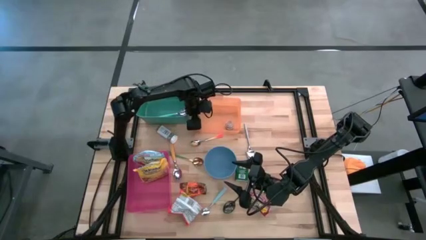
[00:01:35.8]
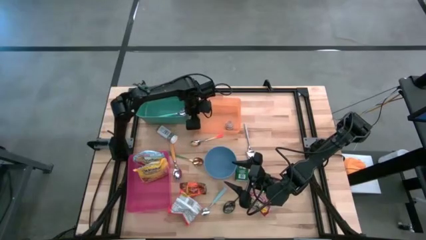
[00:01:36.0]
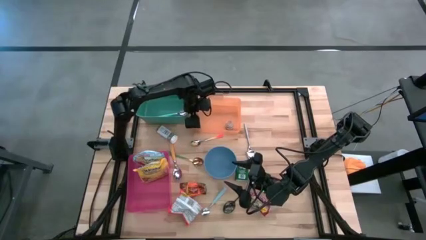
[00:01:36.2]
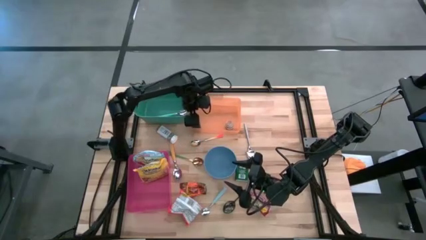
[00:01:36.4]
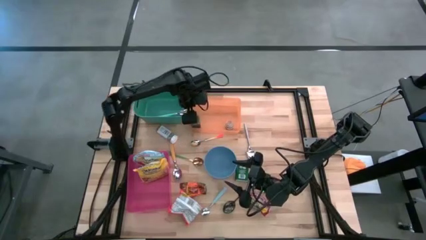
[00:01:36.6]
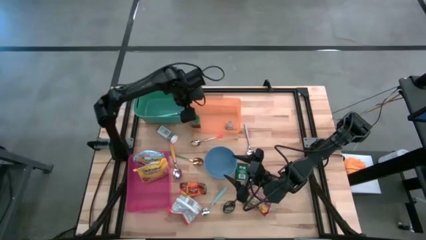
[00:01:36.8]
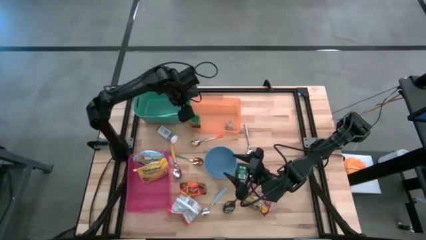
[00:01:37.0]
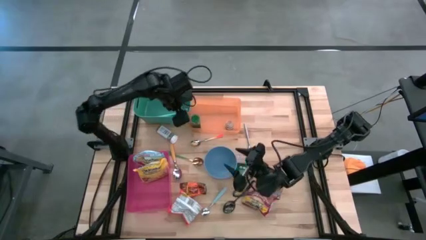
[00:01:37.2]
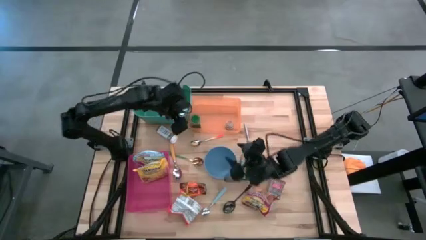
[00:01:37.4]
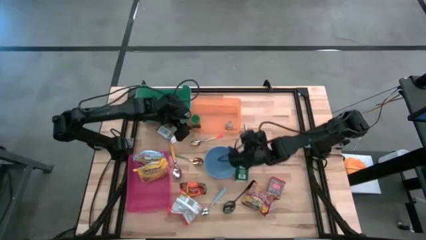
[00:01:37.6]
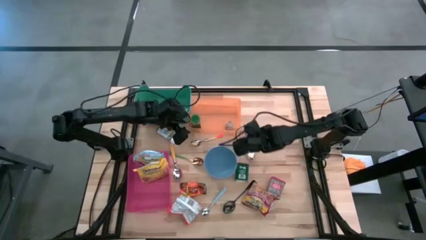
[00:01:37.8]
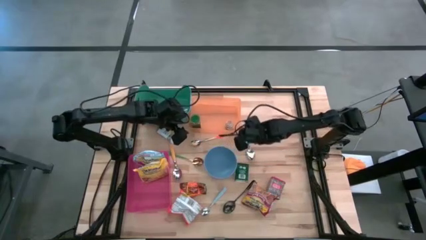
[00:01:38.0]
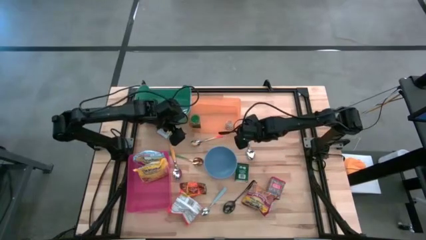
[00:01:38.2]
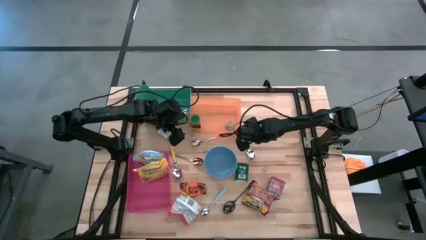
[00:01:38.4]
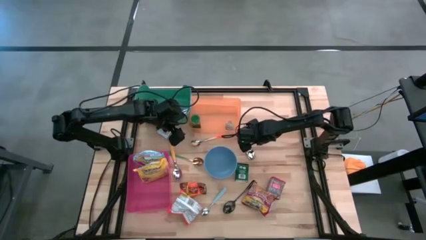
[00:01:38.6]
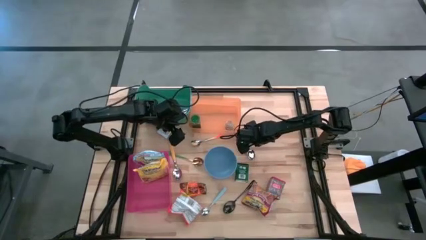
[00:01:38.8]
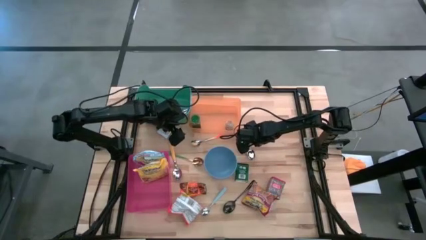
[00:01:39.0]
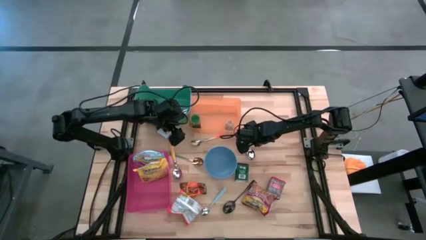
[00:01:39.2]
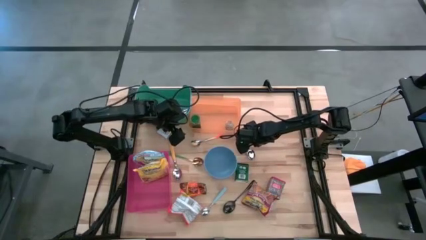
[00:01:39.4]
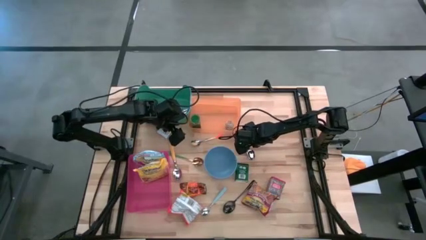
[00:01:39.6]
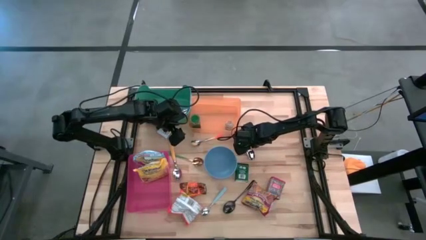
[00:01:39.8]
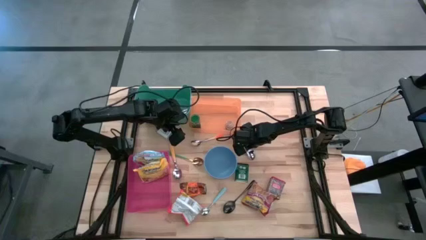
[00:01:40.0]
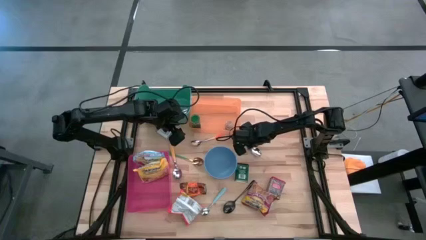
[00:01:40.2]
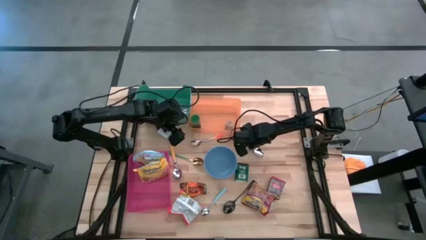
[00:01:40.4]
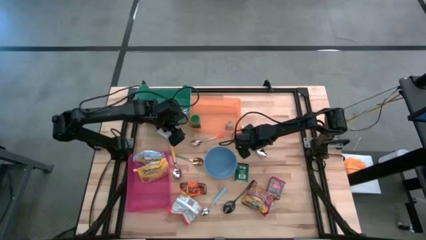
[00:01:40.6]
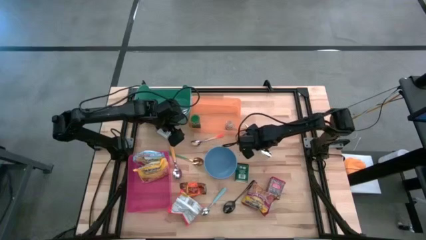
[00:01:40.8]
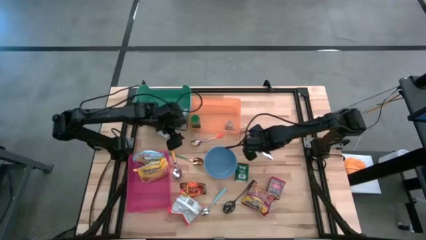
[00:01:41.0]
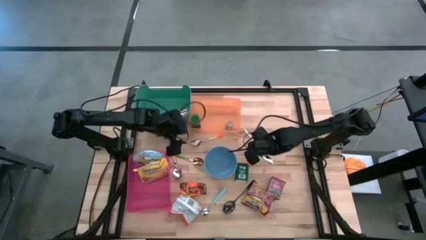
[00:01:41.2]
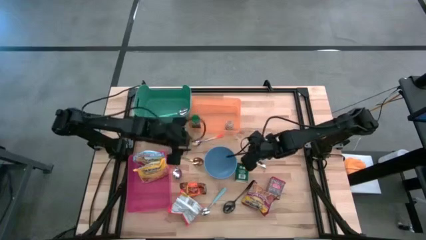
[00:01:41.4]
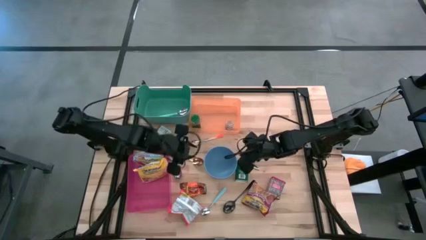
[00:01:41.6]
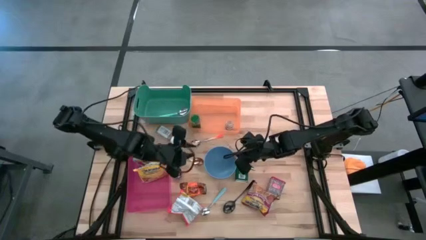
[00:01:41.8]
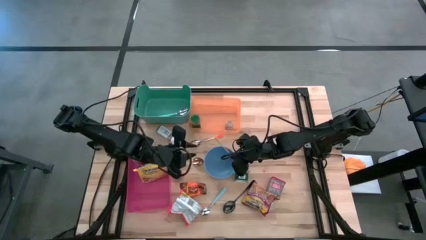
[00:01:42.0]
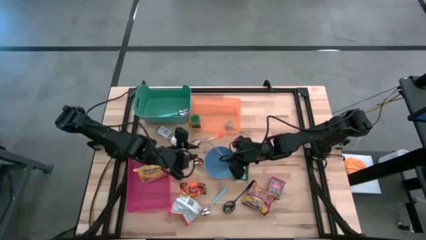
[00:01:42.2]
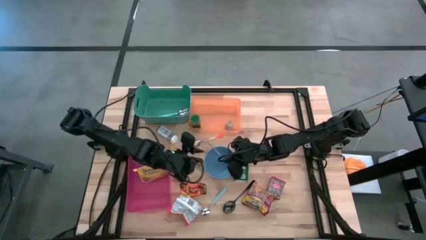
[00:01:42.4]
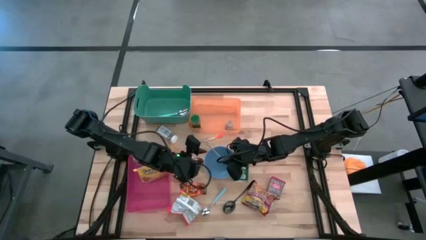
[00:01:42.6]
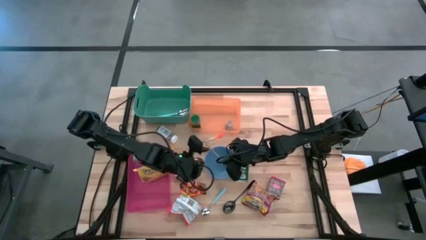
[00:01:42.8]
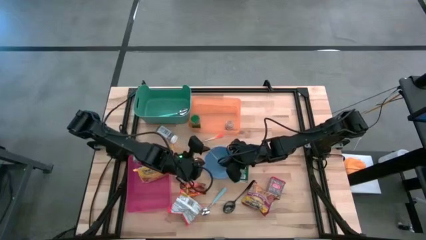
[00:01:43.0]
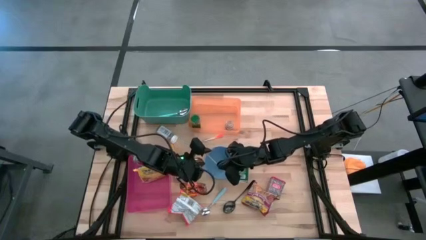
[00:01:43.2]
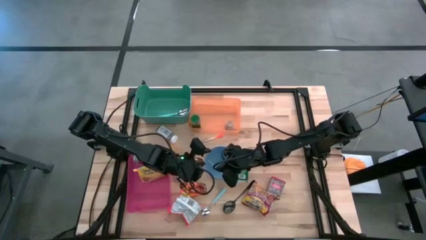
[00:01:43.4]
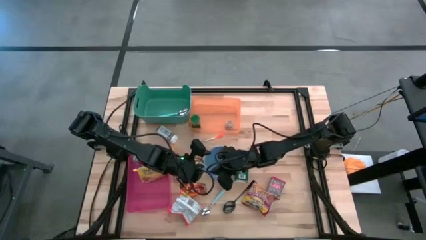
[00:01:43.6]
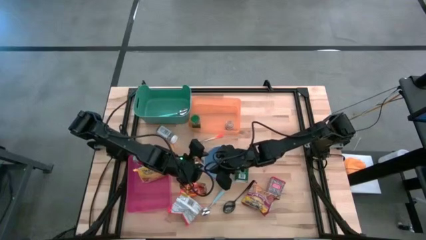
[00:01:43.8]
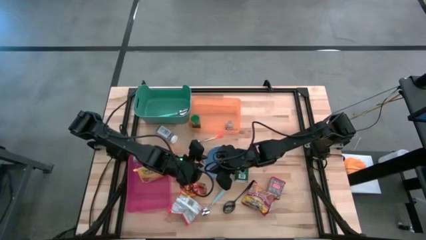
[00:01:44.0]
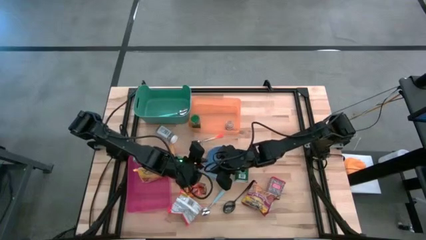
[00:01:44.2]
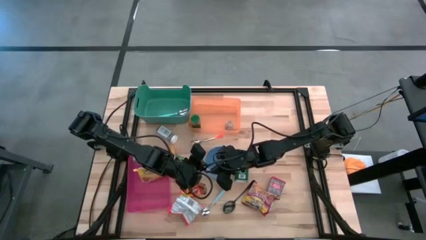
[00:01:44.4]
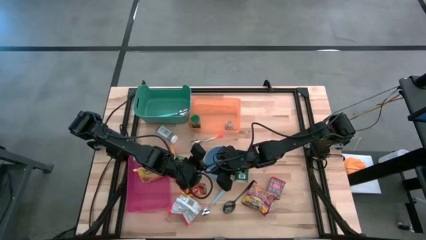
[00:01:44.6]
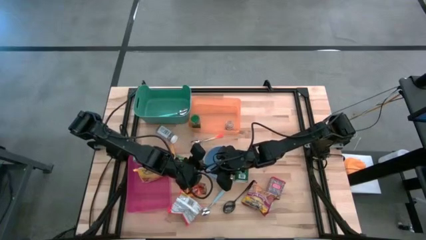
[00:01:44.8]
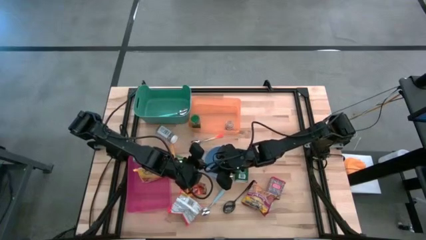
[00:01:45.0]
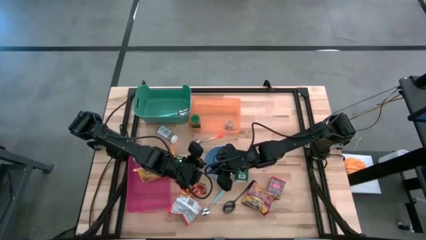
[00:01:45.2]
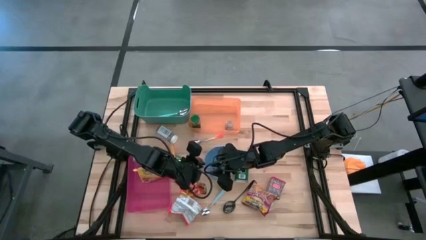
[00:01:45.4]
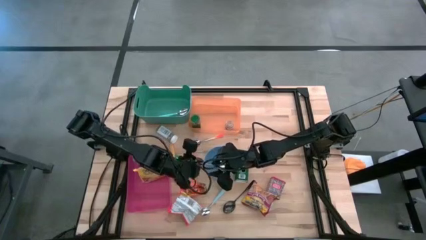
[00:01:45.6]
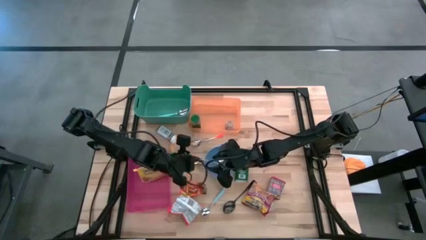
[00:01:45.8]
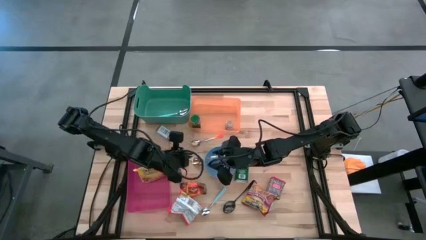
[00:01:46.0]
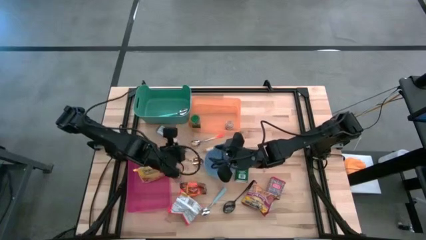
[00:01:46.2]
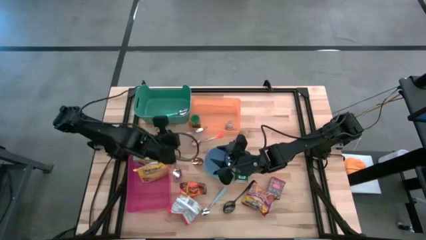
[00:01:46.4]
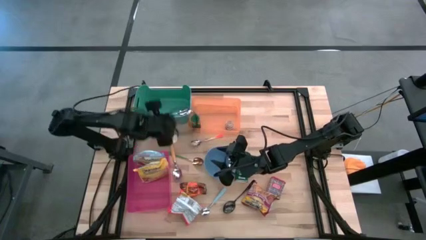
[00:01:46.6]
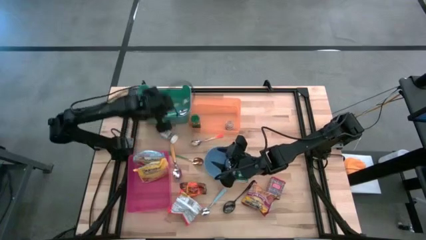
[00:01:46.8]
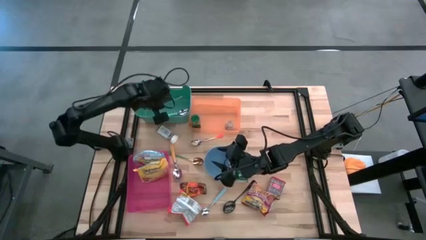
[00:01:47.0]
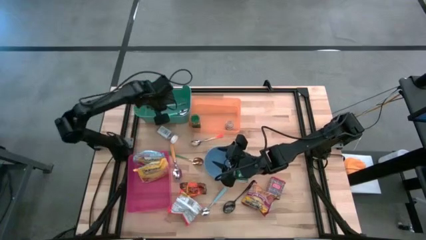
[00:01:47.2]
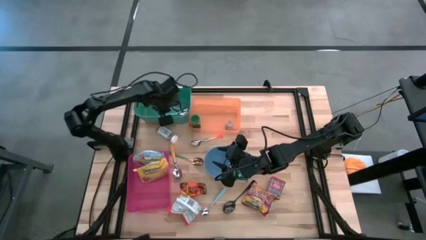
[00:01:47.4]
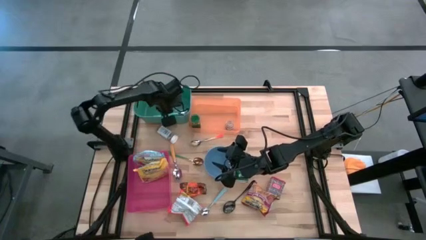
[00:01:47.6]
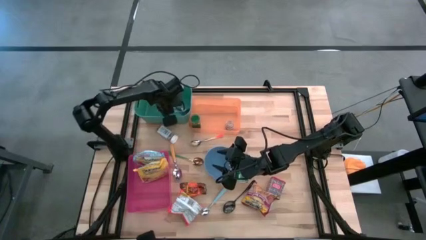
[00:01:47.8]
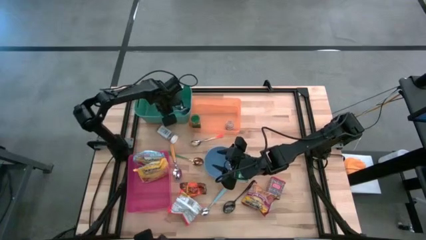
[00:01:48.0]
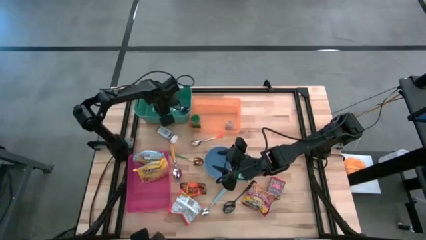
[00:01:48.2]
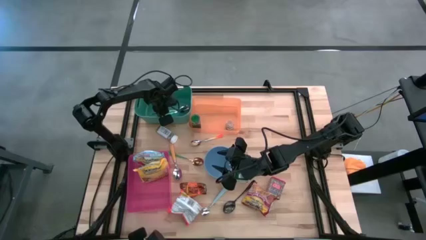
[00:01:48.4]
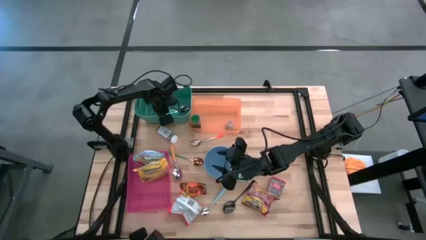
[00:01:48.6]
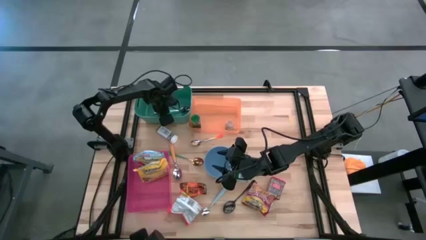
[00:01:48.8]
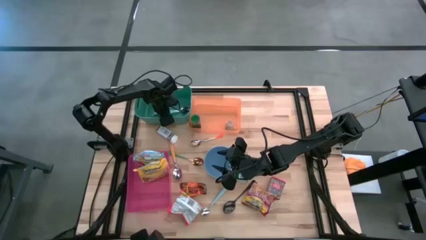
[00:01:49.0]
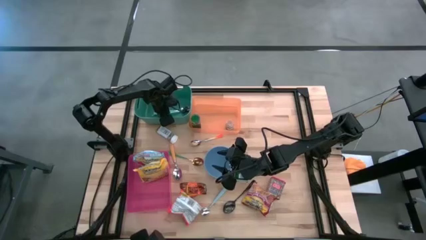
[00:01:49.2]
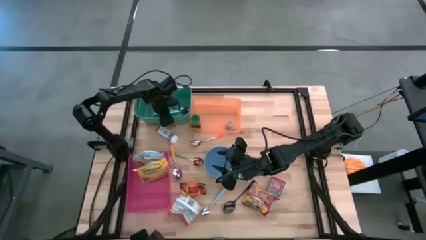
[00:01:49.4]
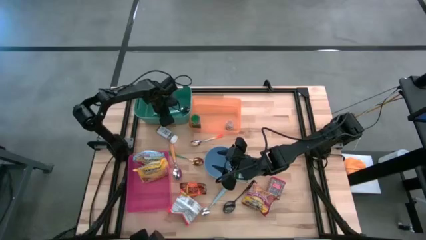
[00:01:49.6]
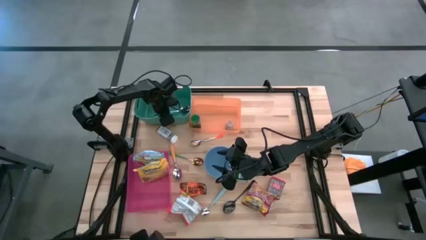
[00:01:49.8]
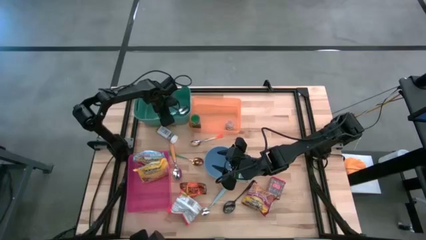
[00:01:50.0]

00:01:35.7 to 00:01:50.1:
Put the silver spoon into the green bin
